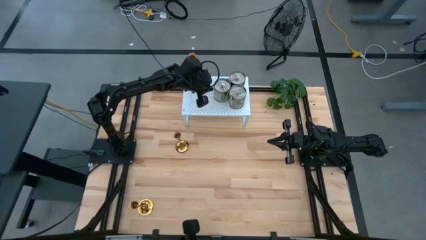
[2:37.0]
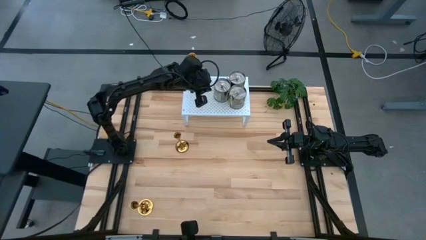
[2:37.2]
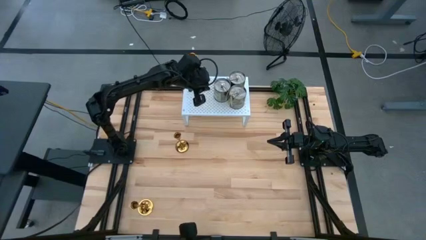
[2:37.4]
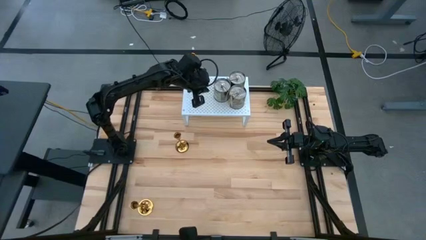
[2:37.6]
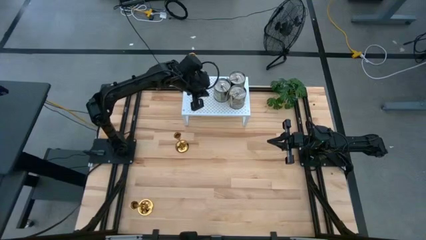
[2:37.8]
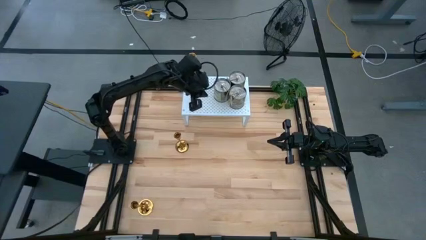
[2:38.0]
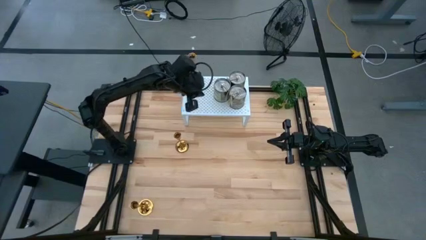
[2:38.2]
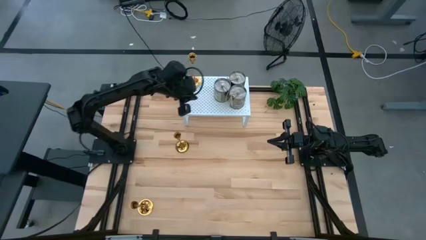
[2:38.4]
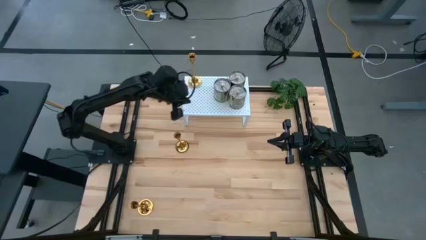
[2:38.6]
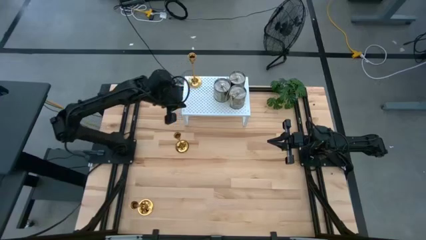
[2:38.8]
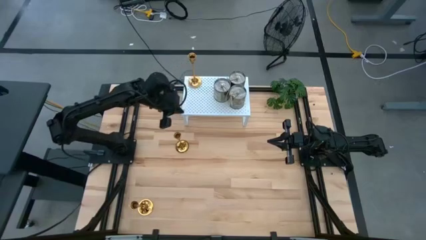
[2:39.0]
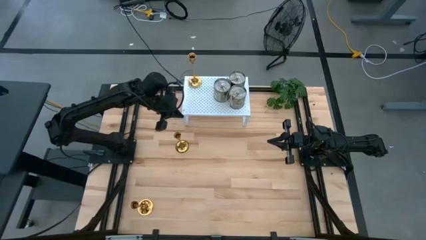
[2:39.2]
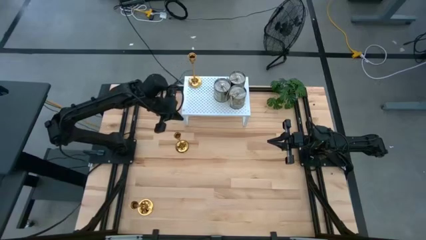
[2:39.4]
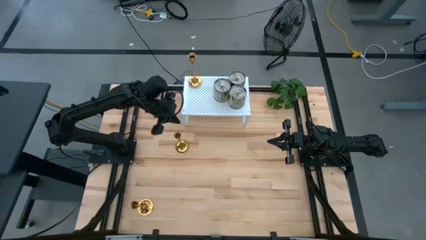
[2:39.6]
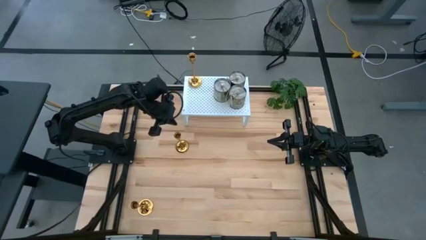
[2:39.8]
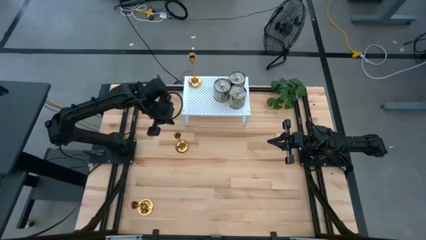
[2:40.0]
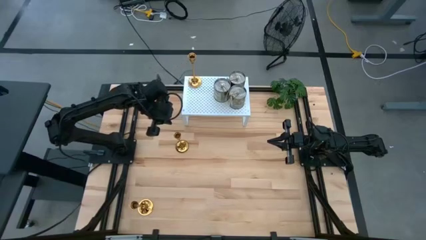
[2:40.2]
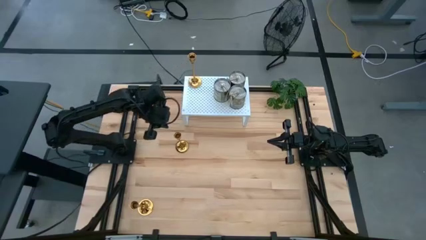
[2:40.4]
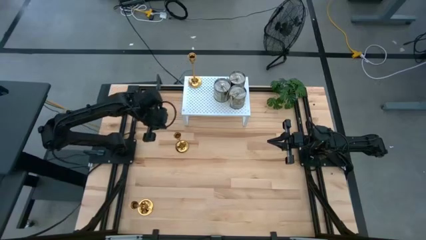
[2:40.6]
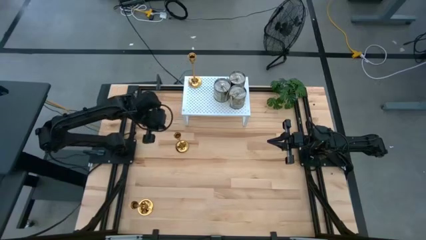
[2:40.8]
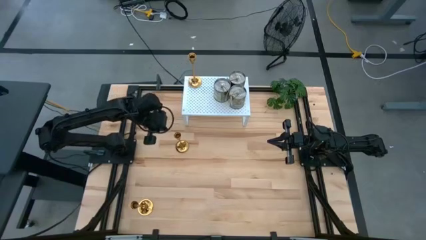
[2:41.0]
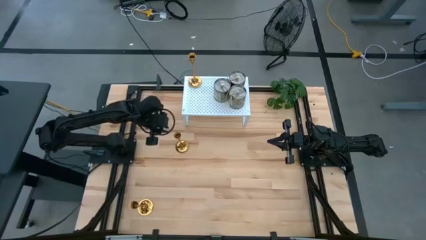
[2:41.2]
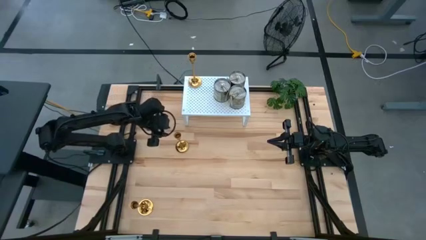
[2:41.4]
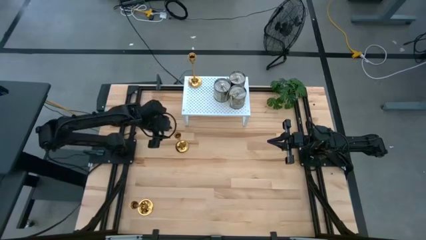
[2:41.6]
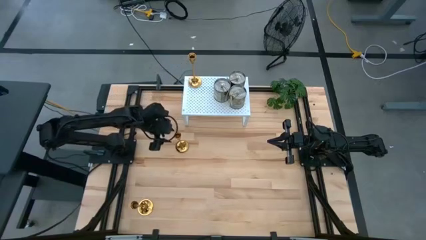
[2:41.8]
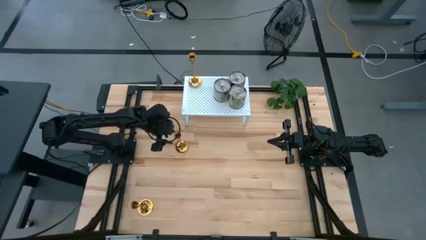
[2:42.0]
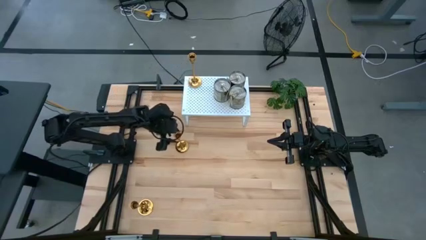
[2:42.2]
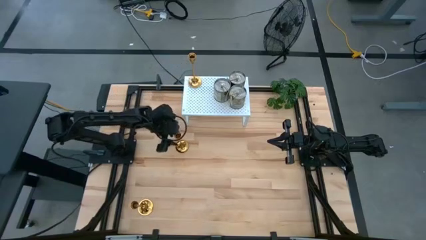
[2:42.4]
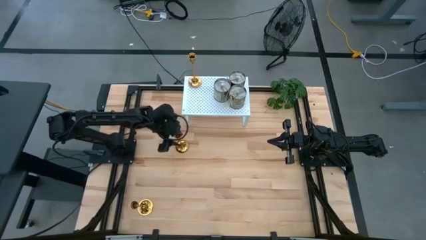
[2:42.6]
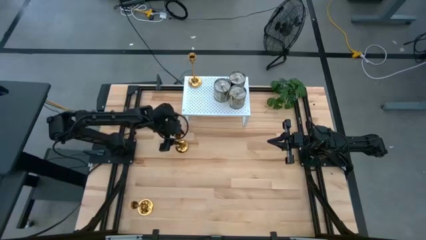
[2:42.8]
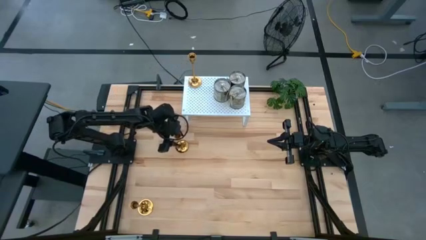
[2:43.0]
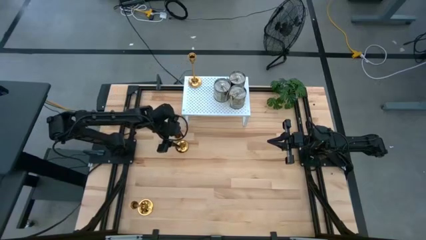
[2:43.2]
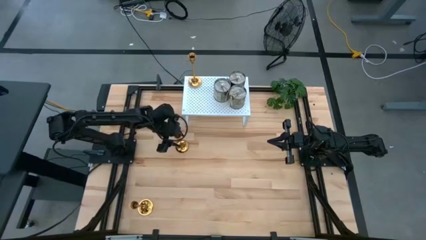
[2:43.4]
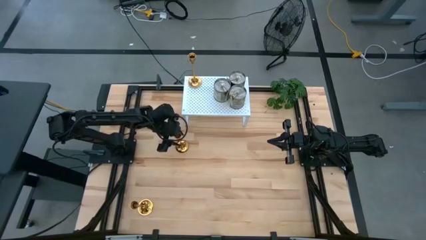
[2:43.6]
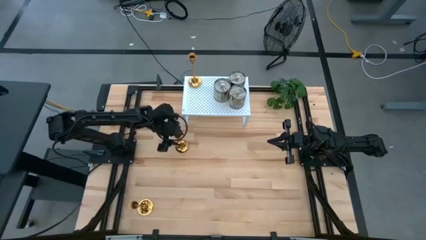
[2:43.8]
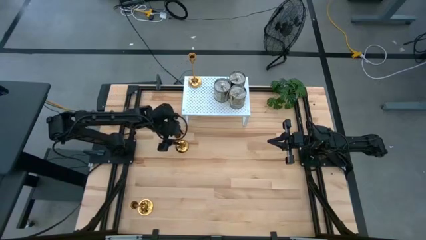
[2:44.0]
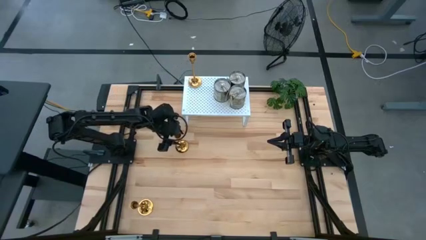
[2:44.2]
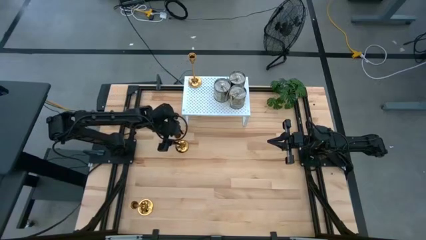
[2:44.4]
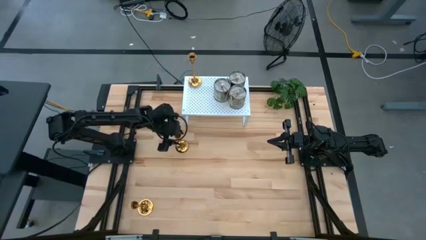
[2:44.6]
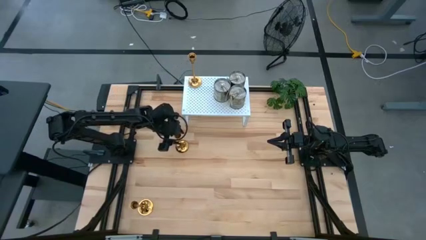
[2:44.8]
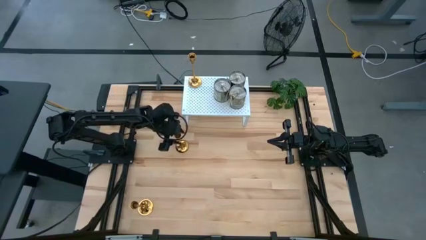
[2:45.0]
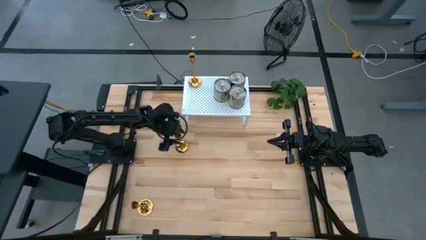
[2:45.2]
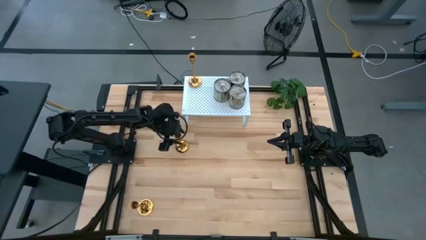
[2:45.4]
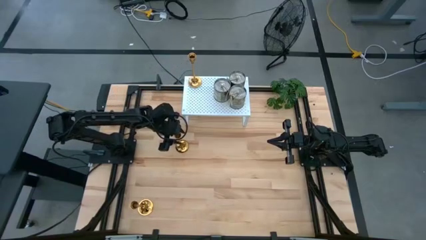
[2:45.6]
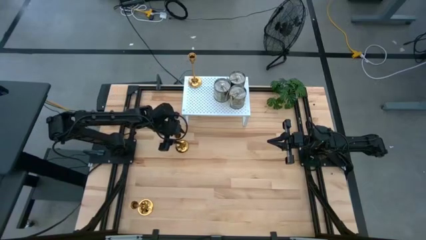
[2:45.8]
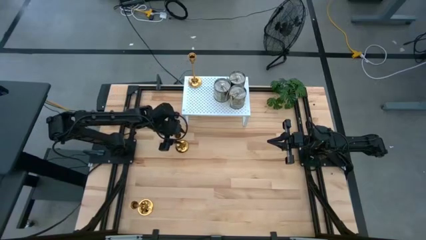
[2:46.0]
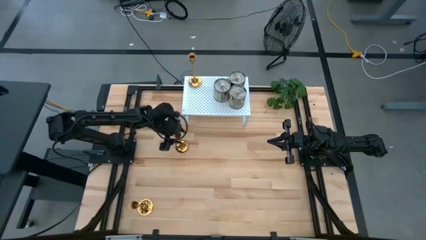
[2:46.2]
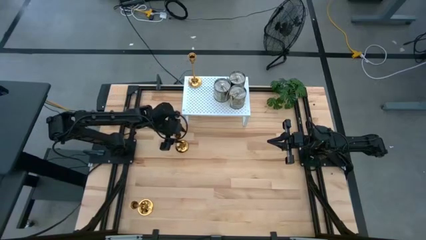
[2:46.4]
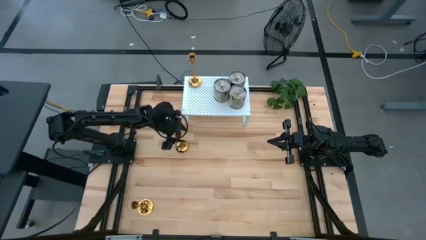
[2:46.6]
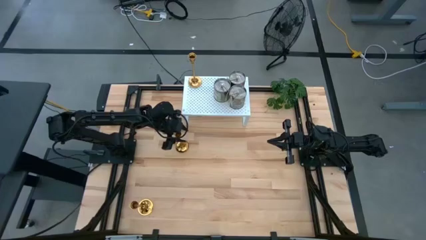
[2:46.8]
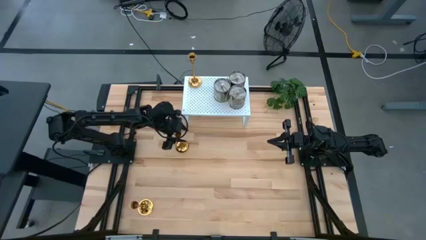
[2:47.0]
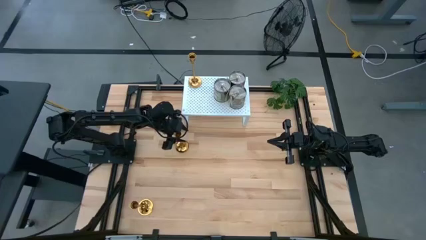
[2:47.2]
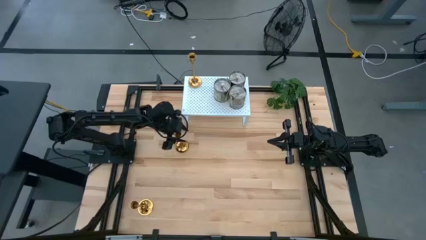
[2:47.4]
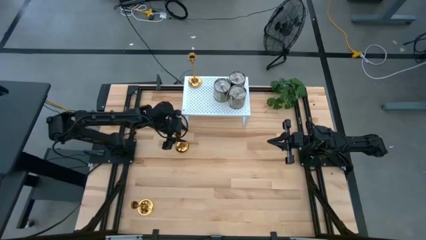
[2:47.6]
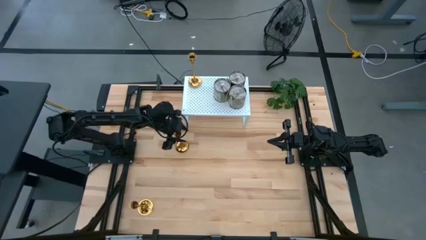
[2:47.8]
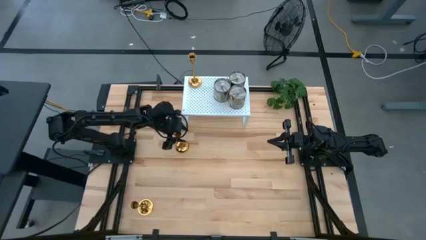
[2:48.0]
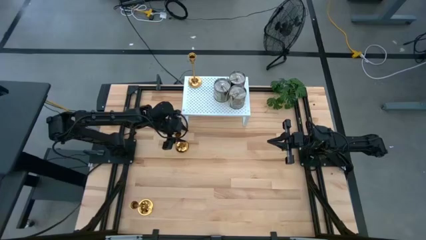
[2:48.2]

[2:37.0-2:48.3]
Task: Pick & Place candle stick holders
Put the top candle holder aligned with the other candle holder on the shelf

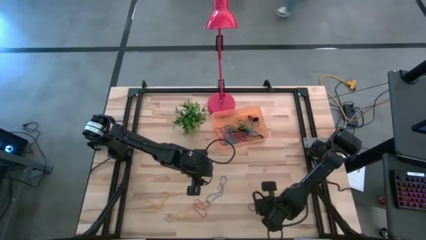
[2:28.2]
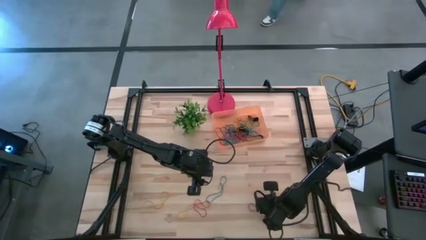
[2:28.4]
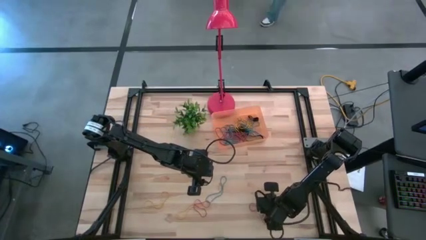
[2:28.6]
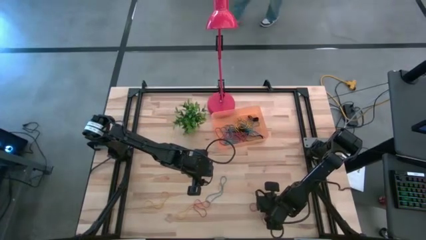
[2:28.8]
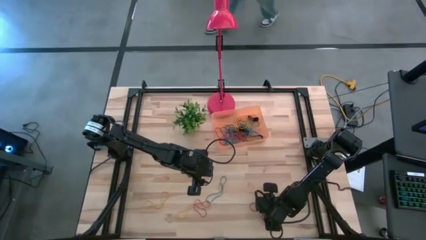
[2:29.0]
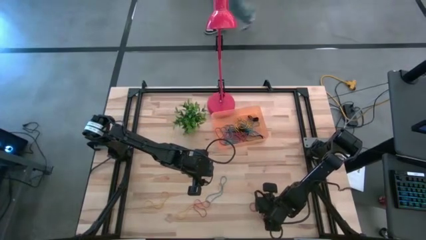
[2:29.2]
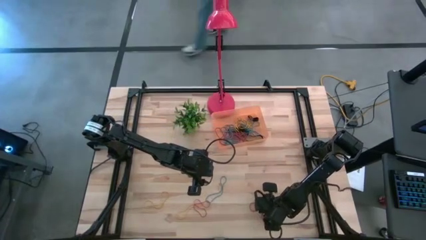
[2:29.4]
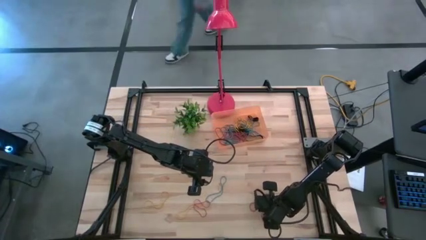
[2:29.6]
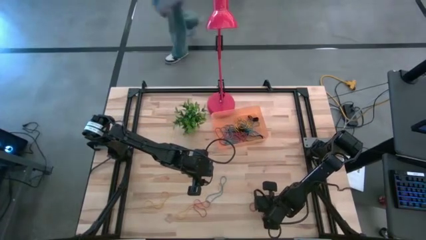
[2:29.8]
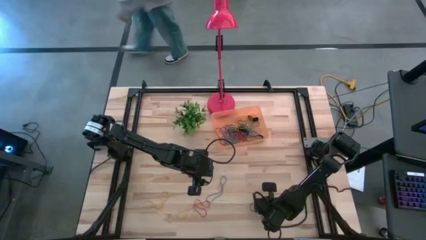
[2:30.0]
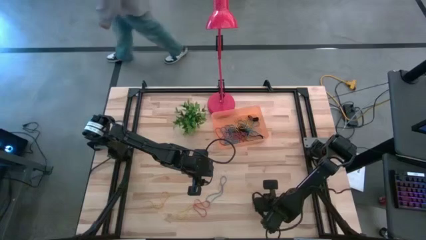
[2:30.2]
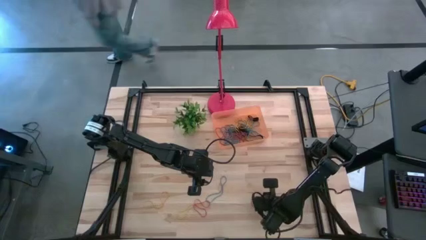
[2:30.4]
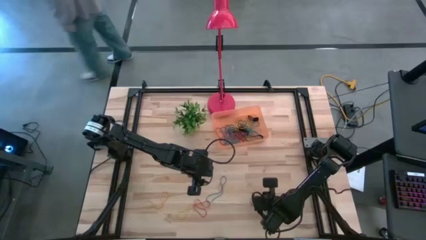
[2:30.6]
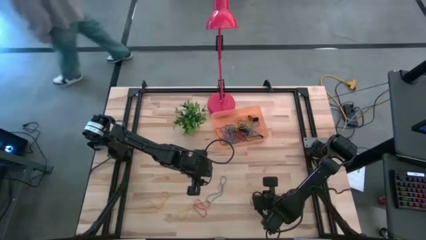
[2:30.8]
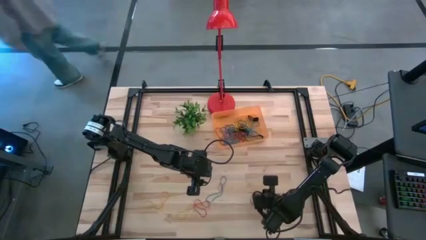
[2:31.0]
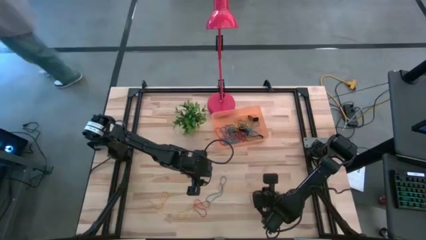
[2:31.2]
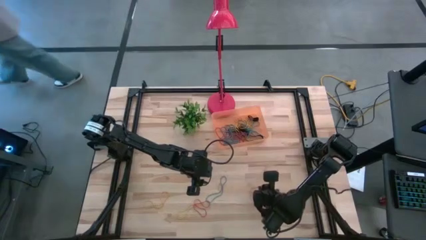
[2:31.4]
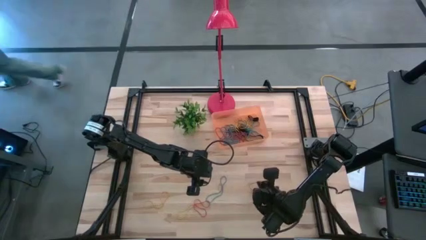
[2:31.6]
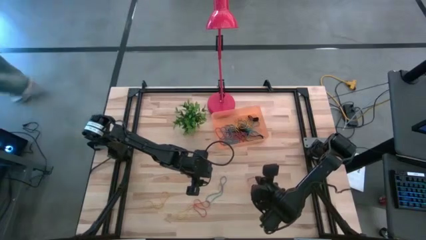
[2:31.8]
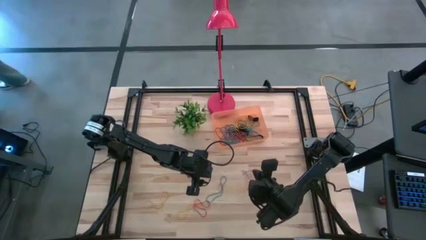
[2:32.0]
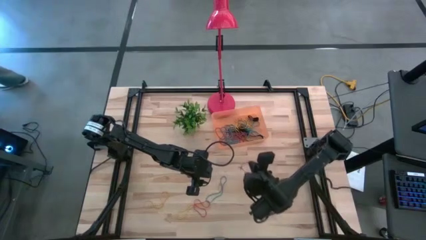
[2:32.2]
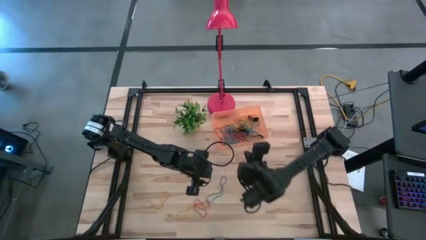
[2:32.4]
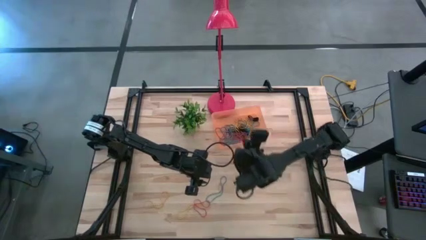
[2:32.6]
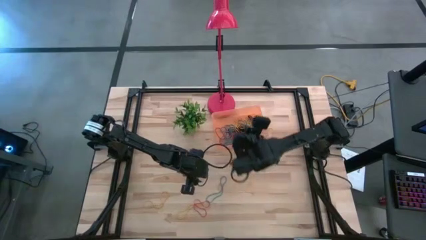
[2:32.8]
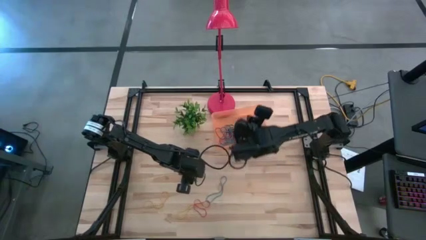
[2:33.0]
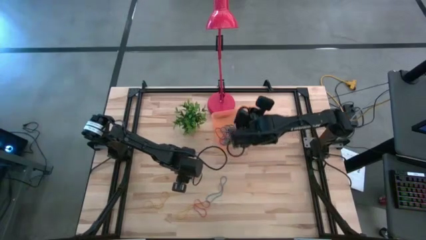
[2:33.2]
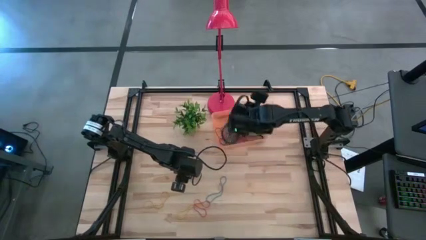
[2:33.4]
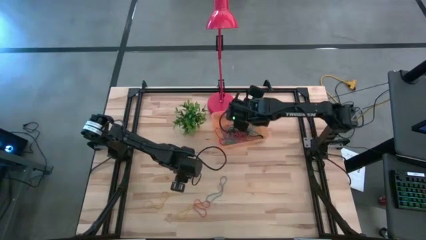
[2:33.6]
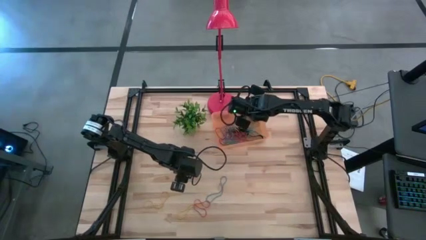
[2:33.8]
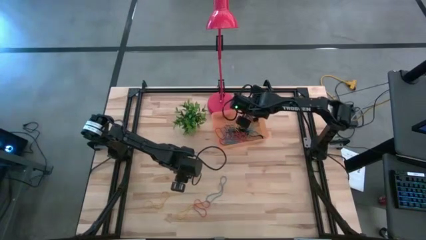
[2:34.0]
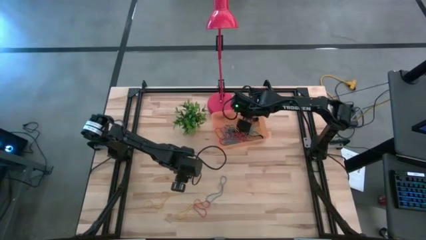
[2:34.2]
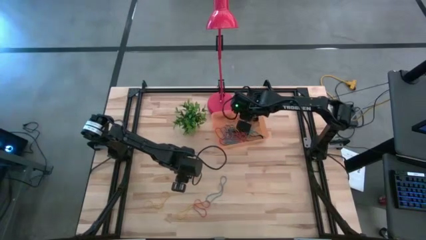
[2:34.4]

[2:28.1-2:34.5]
Task: Pick and place rubber bands into bin
Put the red rubberband into the orange container
